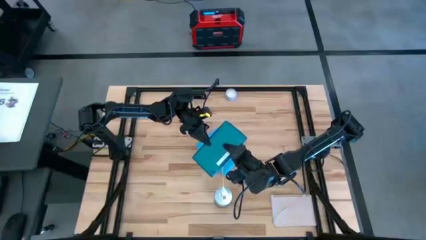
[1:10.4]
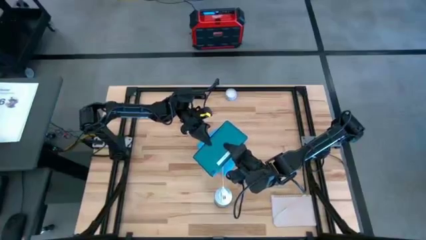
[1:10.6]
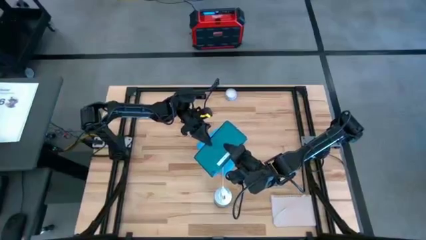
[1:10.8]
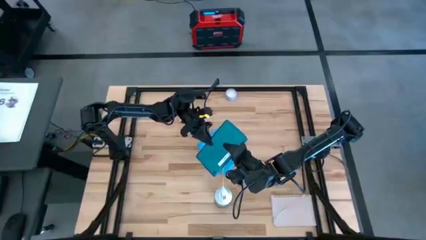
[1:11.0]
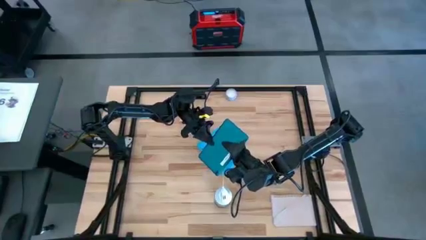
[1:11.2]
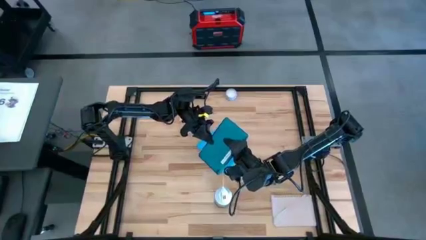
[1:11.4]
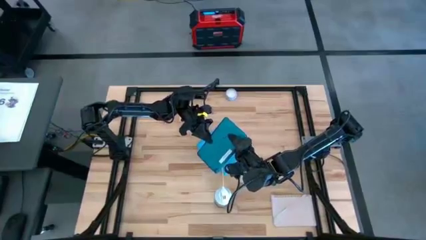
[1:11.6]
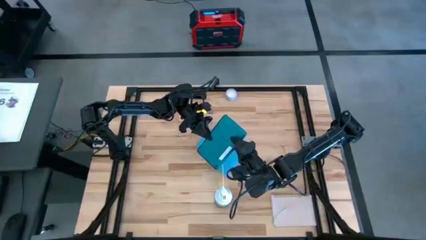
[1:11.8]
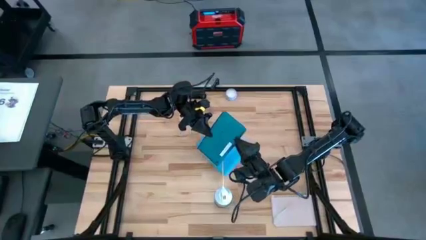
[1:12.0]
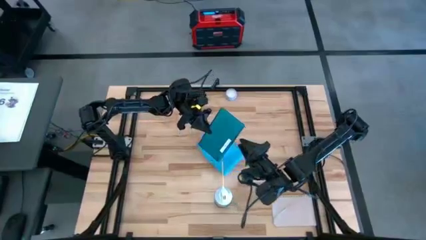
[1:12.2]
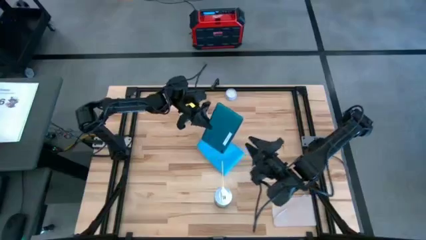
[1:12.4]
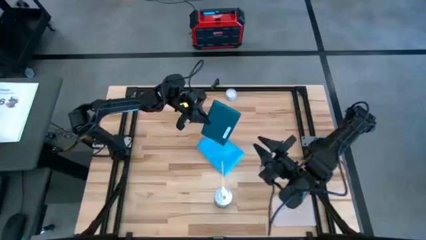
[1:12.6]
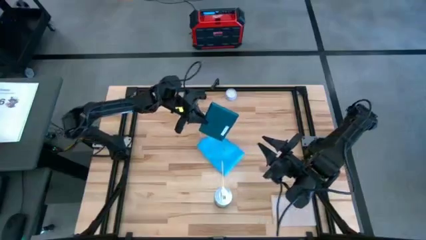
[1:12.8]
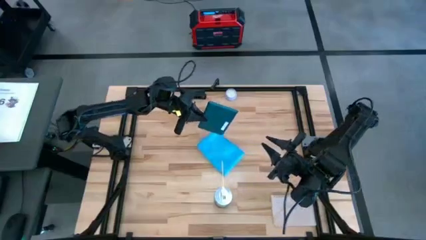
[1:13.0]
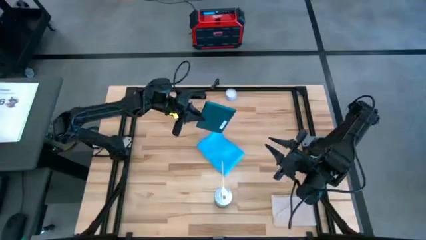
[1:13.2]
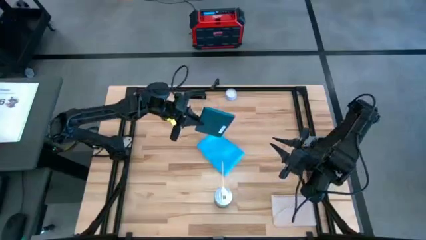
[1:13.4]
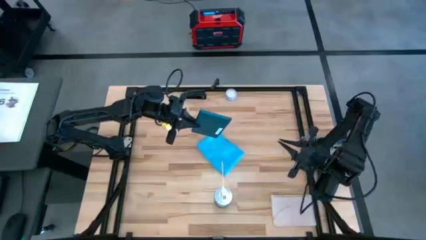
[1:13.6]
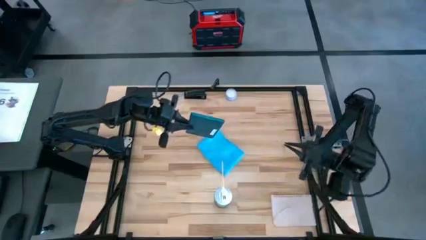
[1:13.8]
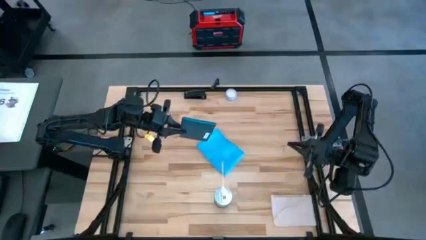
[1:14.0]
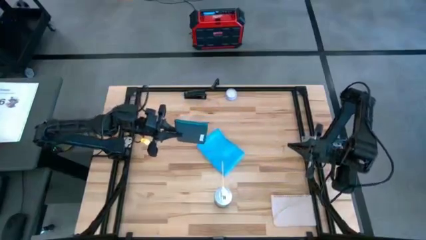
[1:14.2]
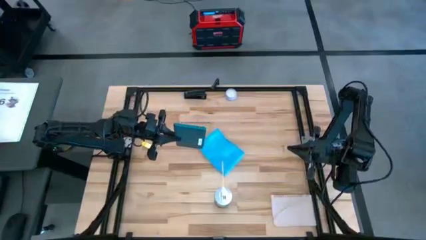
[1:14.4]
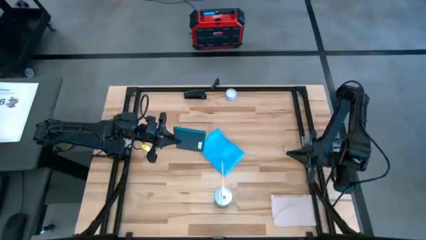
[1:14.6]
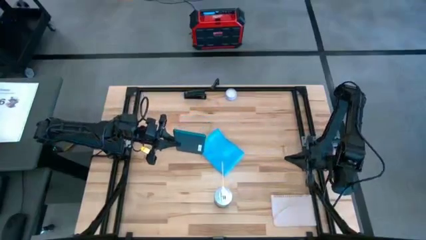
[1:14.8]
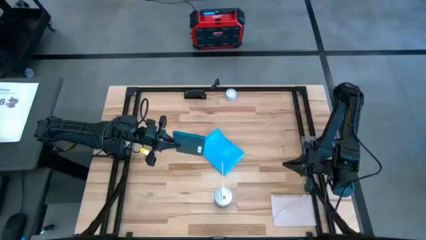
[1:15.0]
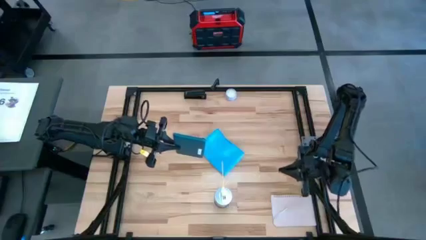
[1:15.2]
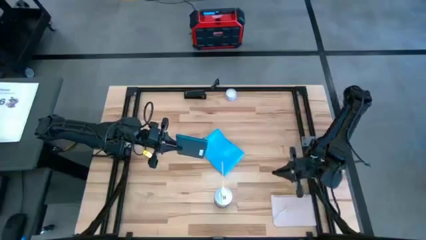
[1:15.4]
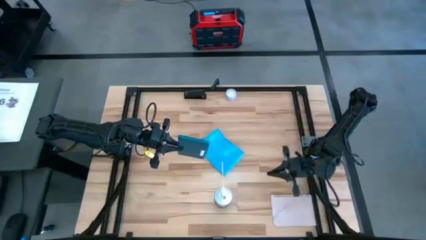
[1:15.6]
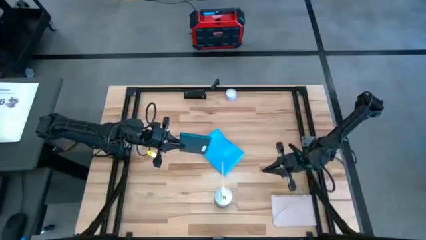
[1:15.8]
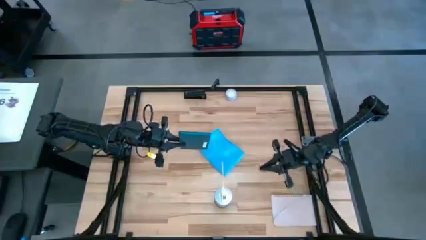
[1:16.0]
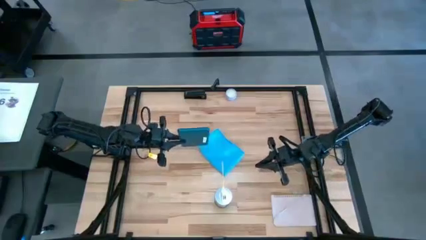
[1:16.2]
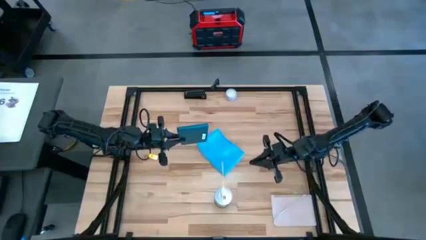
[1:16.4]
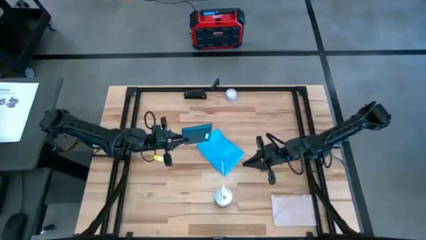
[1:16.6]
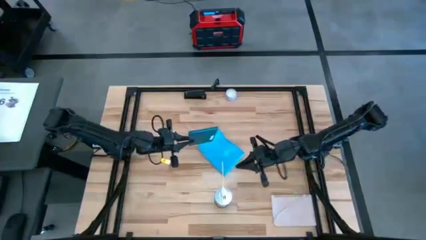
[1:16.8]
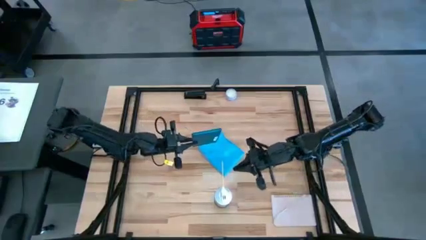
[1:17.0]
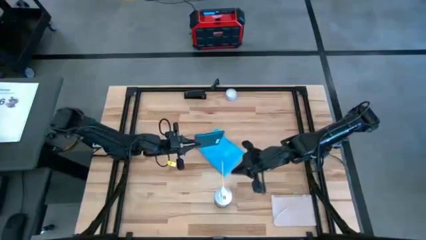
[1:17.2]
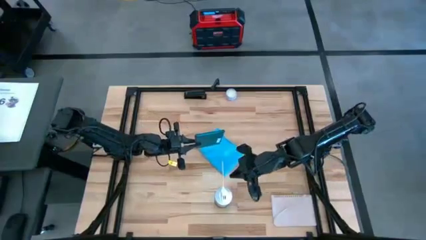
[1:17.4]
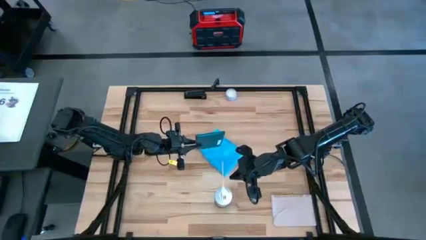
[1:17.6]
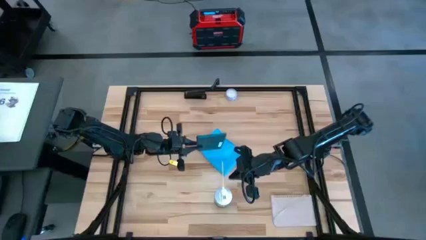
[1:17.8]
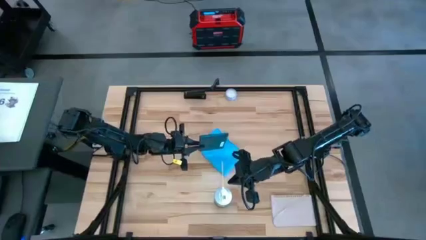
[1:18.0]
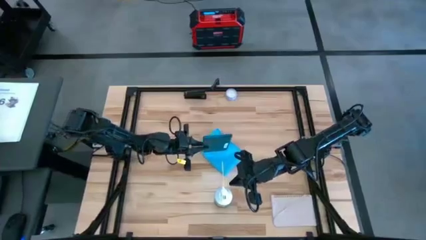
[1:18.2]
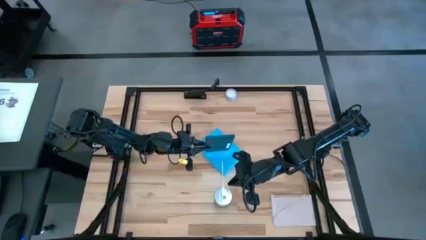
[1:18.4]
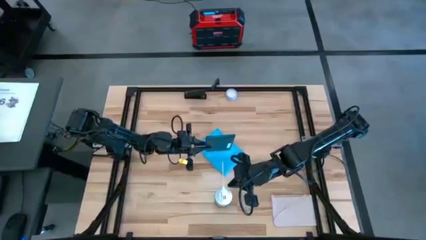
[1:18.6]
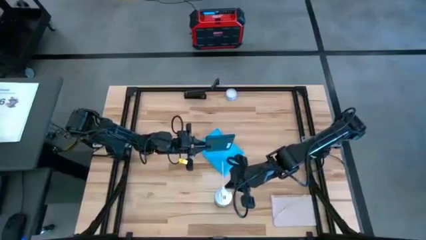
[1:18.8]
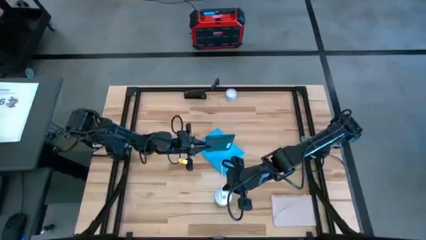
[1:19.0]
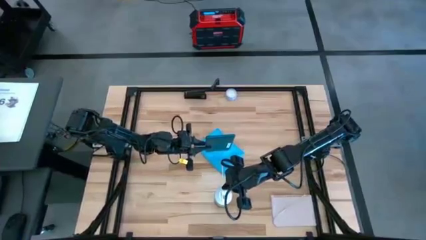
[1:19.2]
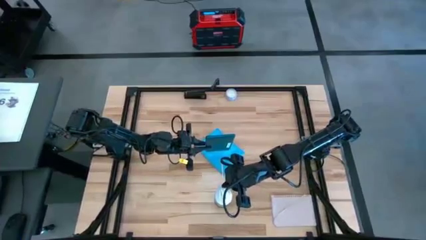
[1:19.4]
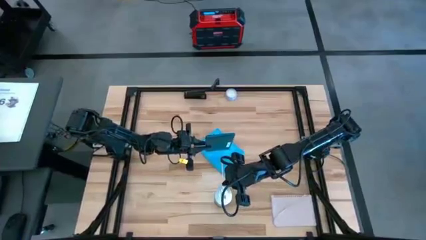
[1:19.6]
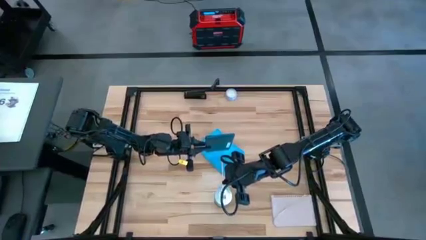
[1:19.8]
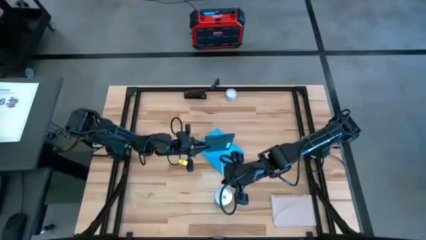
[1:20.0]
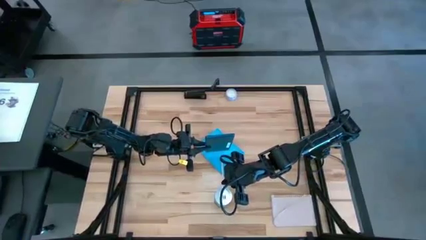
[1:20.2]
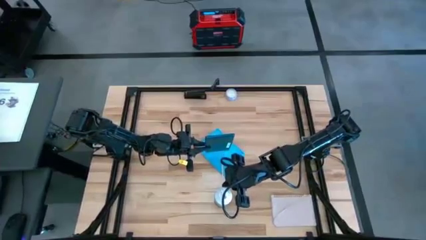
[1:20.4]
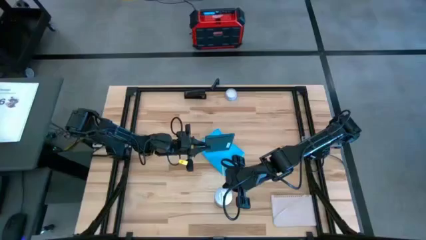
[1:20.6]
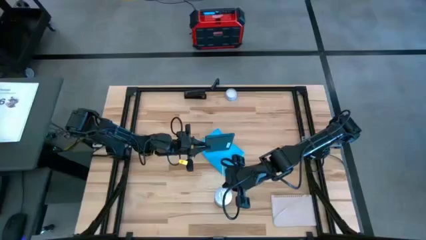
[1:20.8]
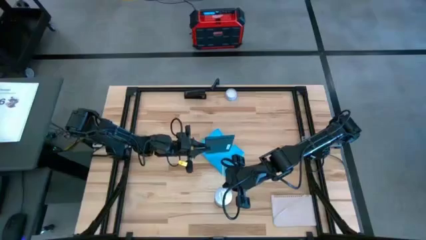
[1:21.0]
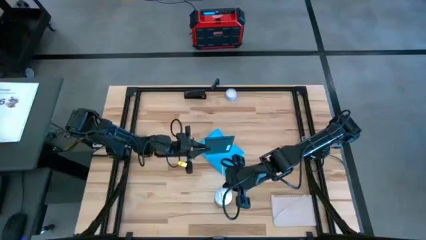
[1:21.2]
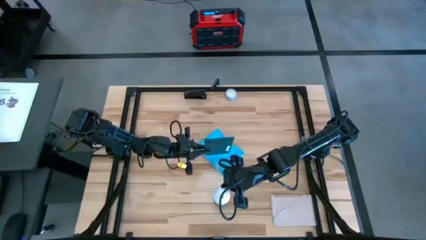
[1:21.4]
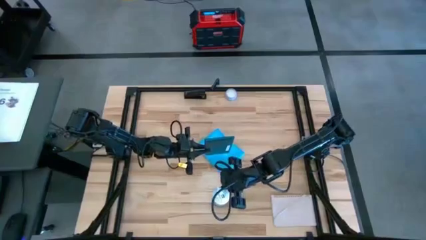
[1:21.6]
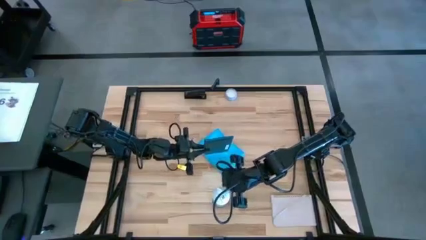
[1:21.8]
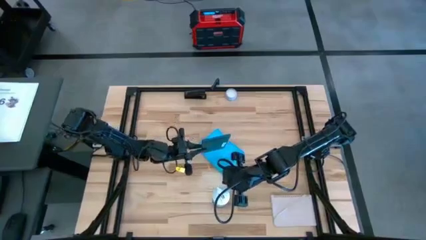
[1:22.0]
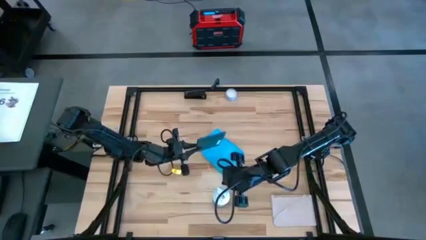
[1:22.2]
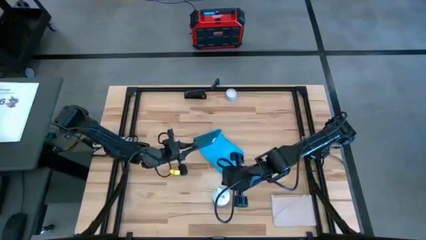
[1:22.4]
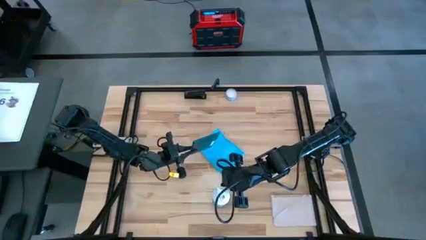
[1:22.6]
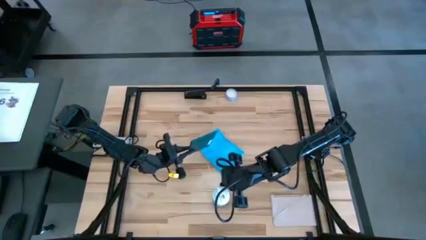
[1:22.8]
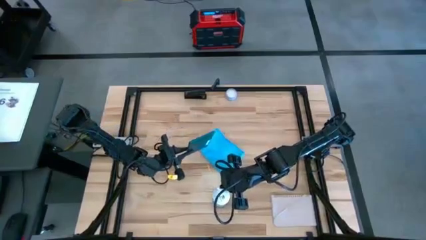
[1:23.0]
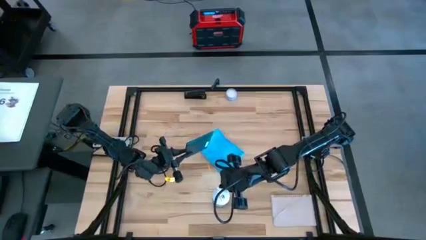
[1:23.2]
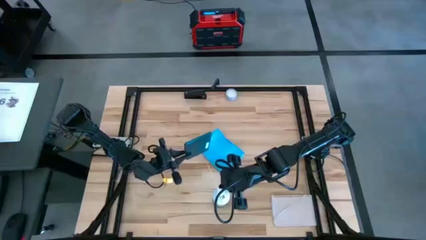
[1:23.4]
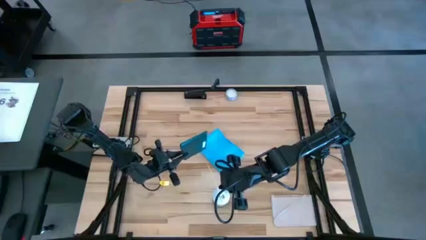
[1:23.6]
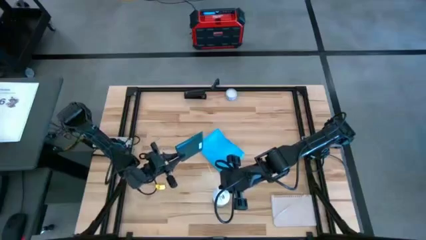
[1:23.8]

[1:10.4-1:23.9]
Task: Apply microfiber cloth
Spray the back of the black tablet using the spray can

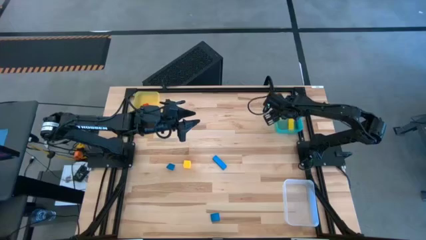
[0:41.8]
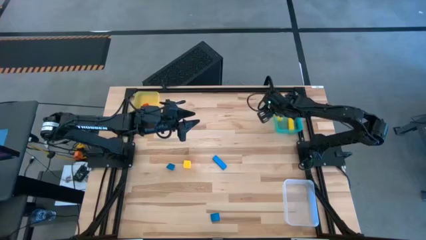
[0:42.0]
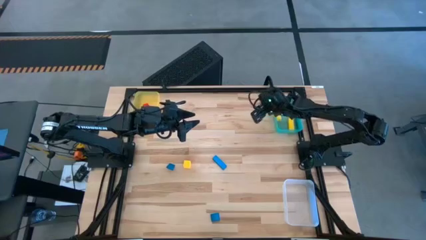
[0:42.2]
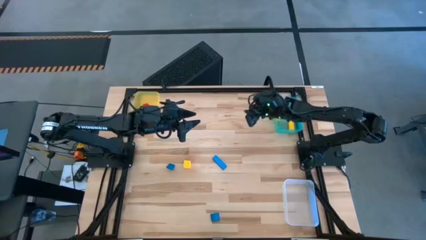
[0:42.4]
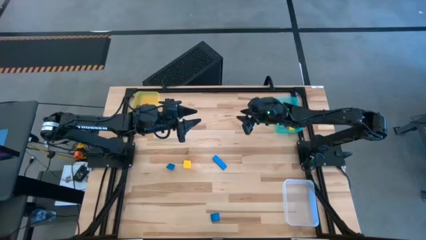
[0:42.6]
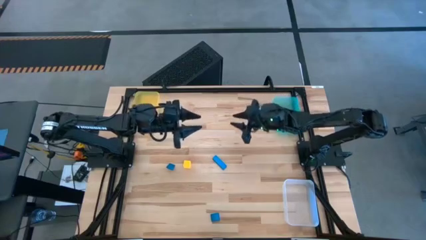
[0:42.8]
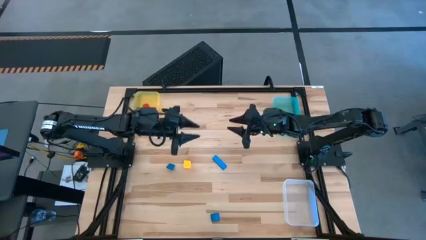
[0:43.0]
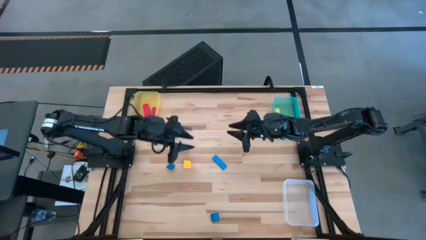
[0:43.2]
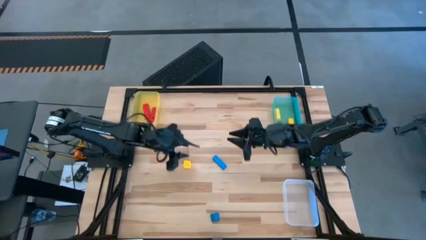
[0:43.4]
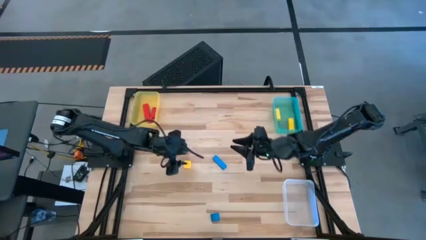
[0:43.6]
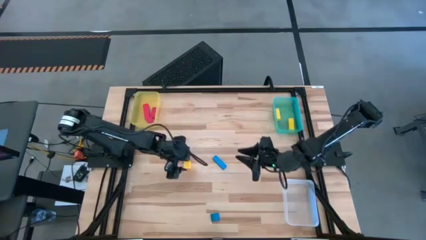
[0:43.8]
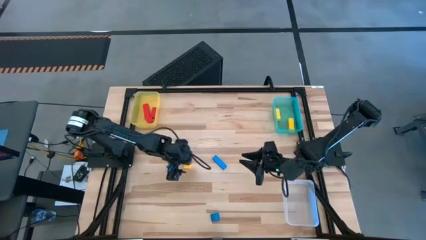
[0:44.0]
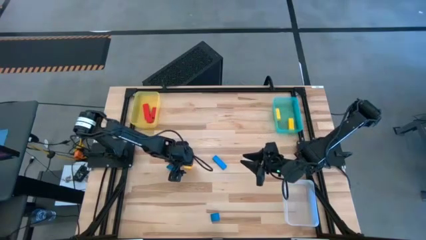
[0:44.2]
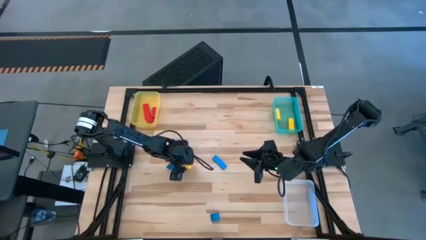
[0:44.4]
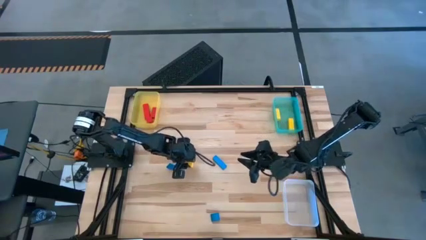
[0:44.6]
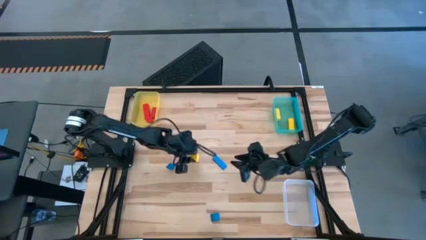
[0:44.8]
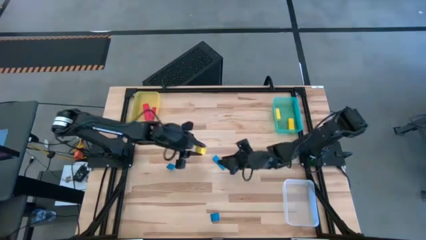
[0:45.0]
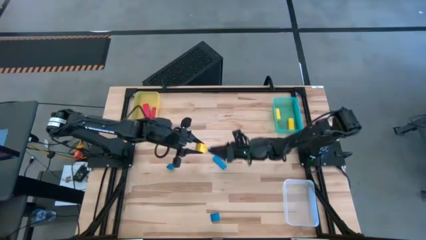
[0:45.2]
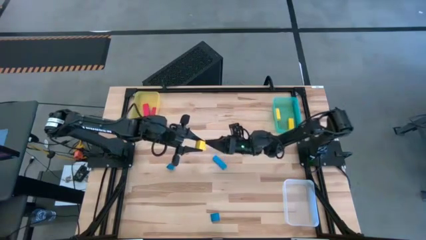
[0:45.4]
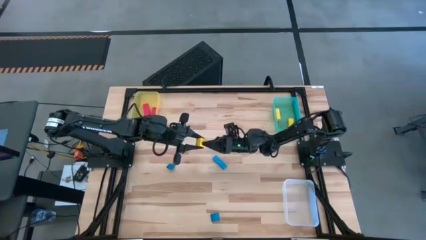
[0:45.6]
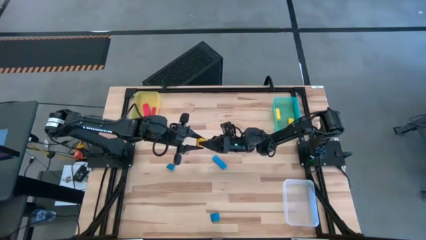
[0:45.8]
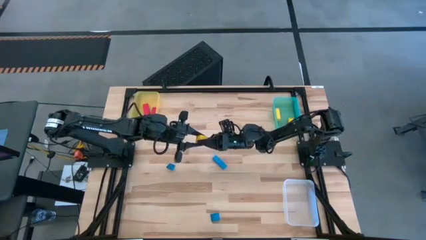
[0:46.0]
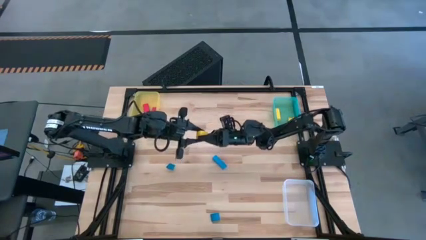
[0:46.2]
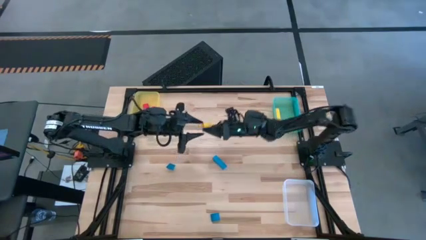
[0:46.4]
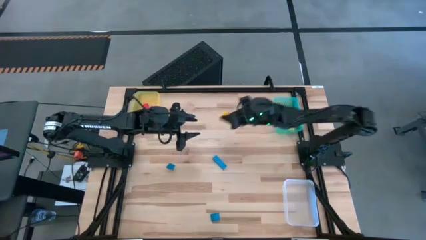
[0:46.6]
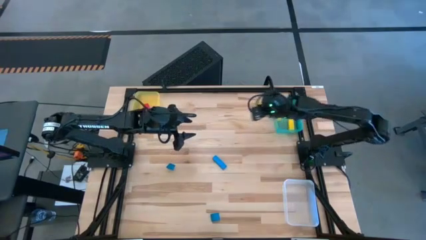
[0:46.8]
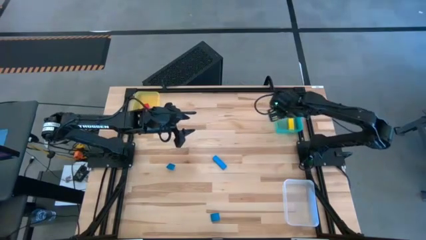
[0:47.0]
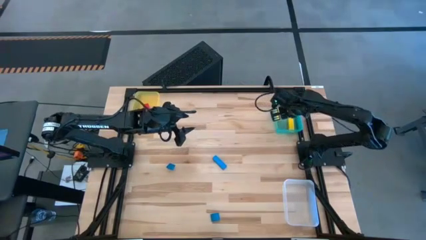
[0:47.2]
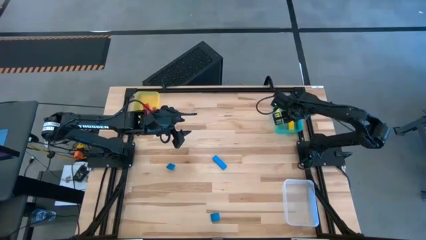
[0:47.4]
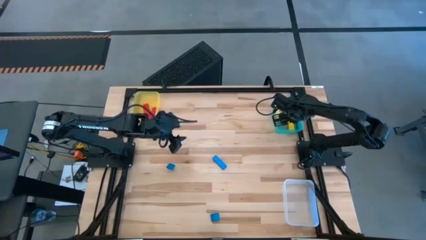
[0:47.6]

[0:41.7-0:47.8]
Task: Sort & place blocks by color
Put the yellow block into the green bin
